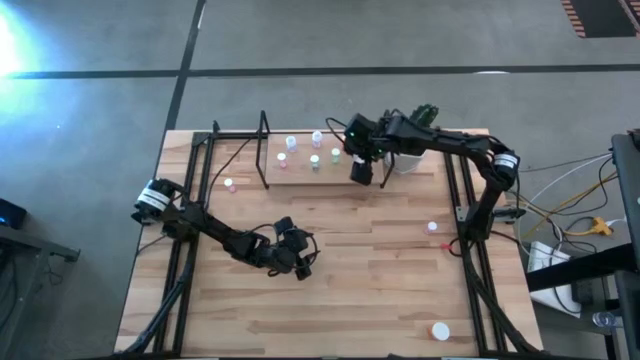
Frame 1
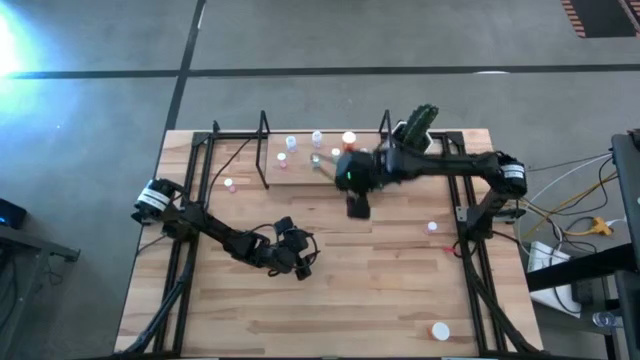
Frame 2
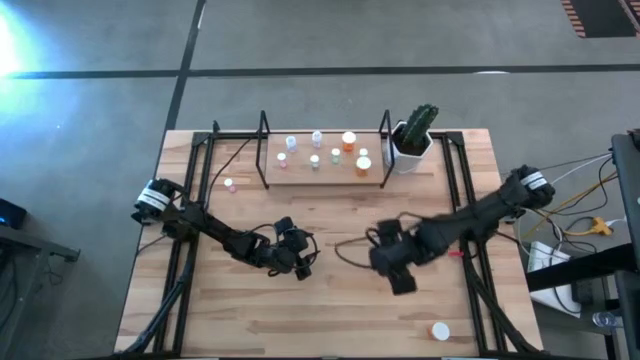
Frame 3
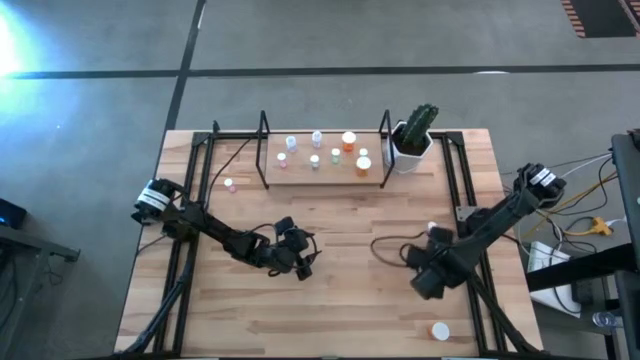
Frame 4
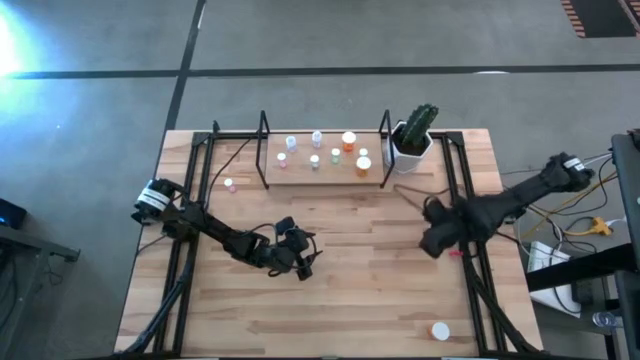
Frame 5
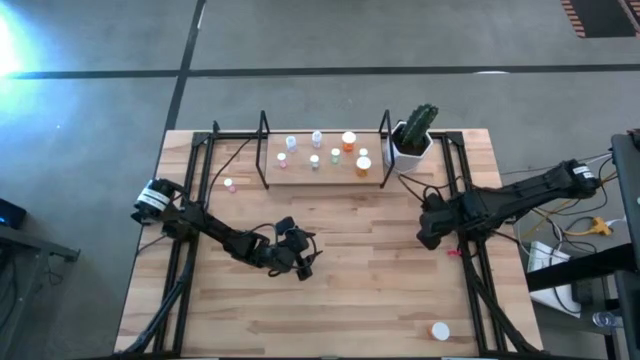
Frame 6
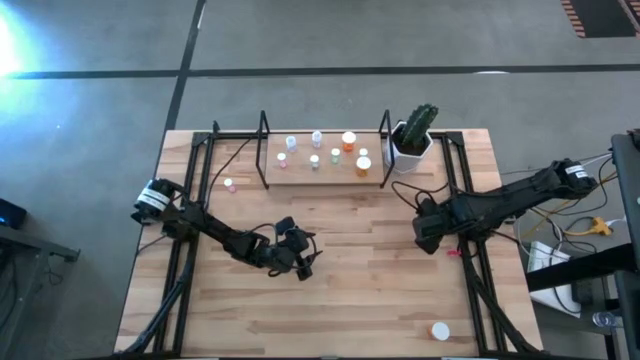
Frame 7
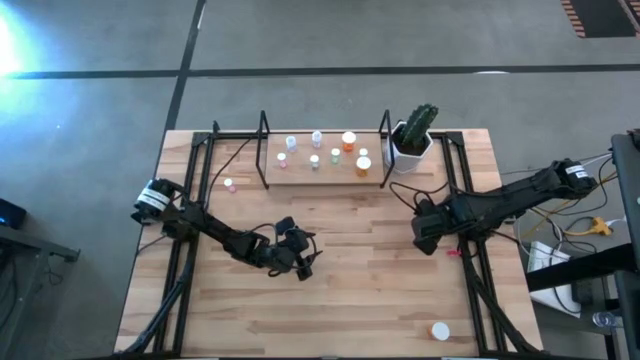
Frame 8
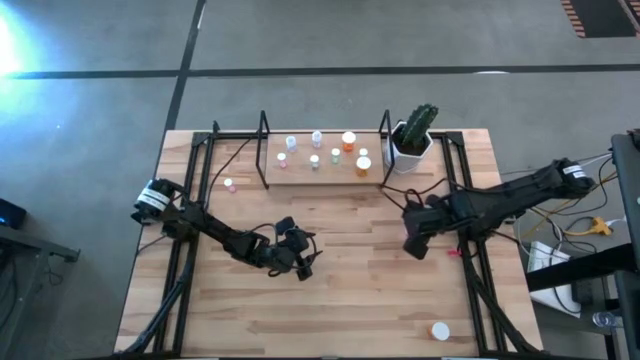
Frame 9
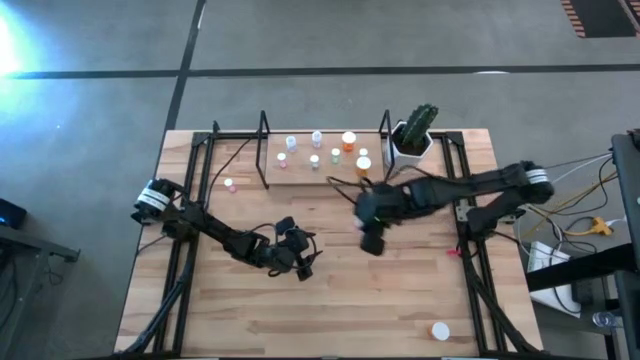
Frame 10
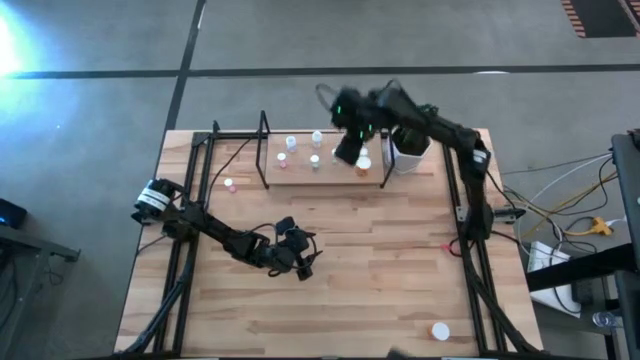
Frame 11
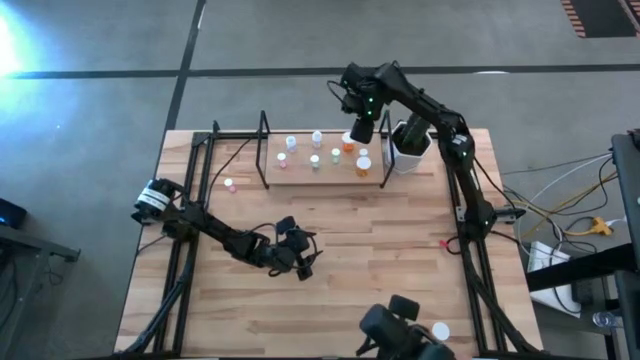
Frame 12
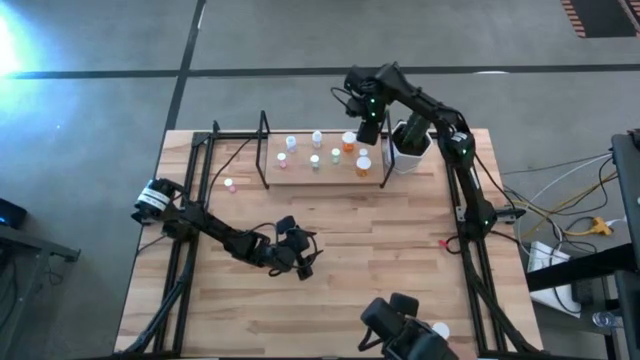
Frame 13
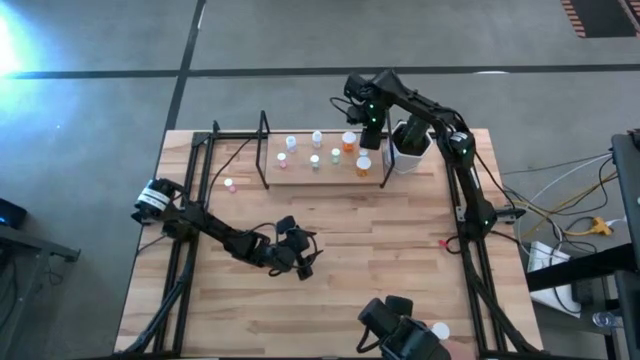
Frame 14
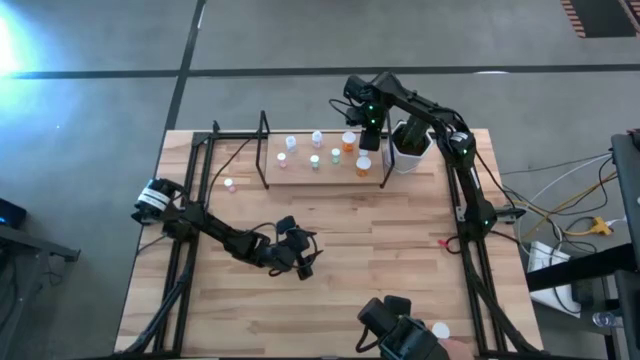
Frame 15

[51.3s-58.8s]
Task: Pick and place medicine bottles onto shelf by color
Put the bottom pink medicine bottle on the shelf

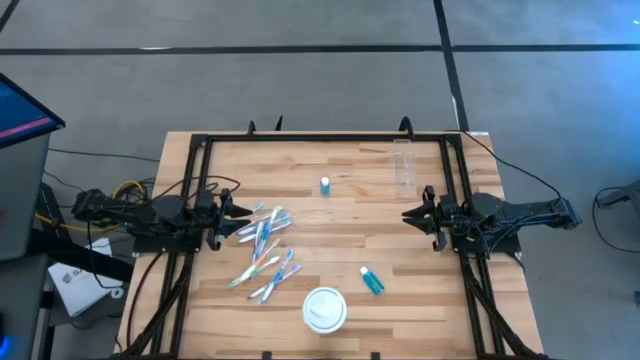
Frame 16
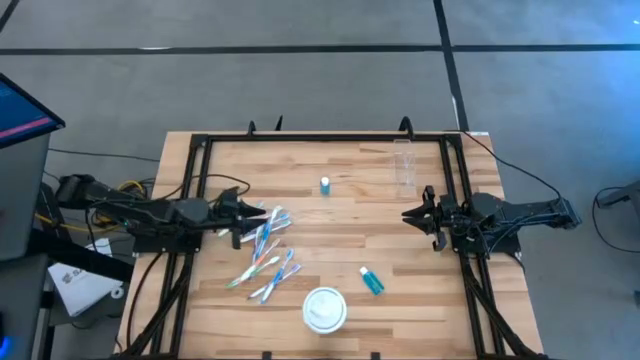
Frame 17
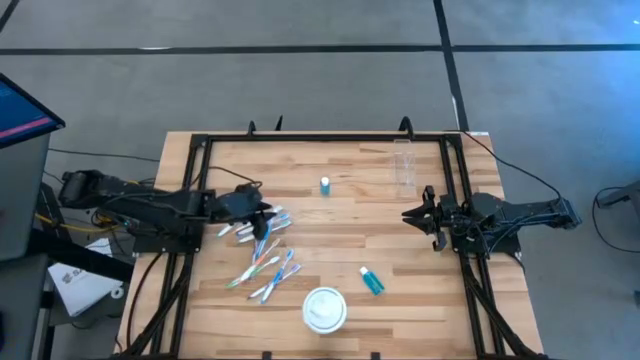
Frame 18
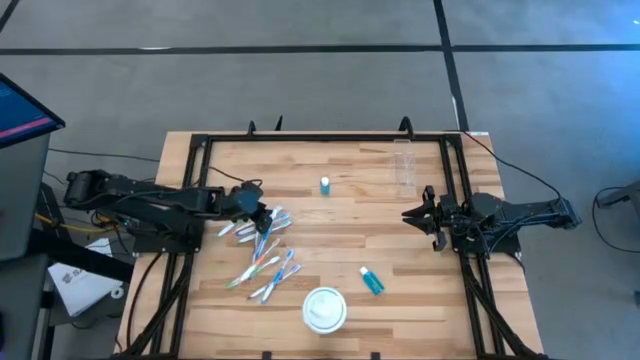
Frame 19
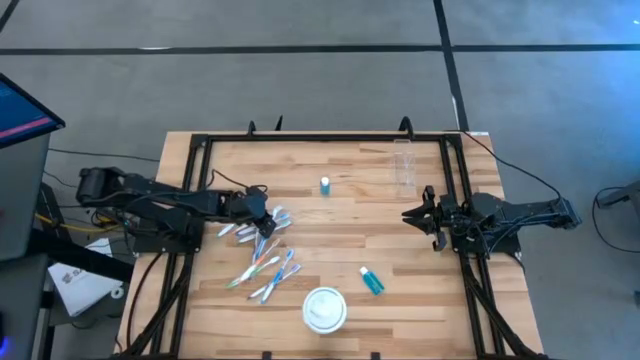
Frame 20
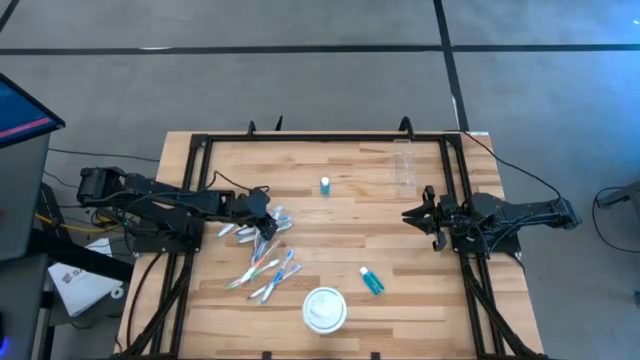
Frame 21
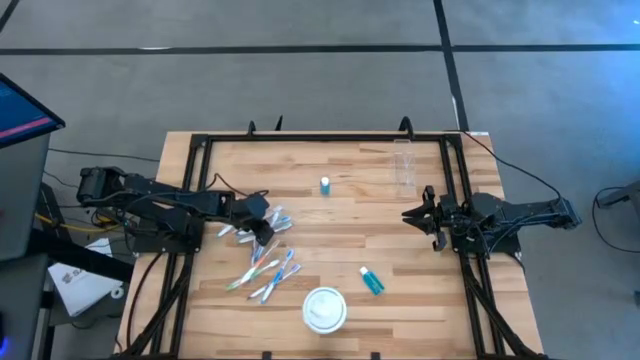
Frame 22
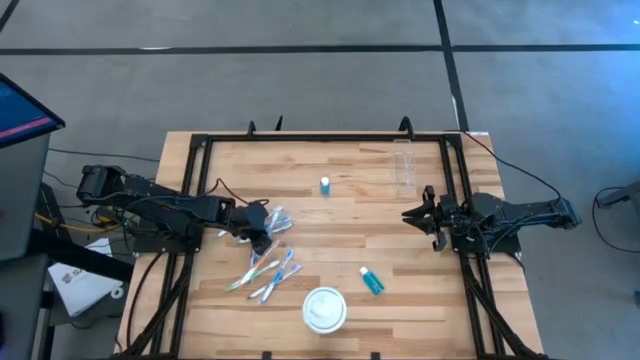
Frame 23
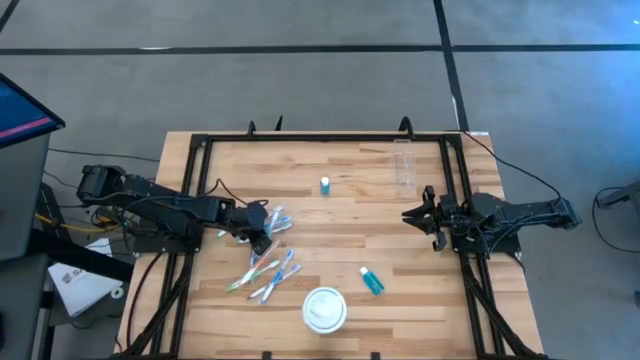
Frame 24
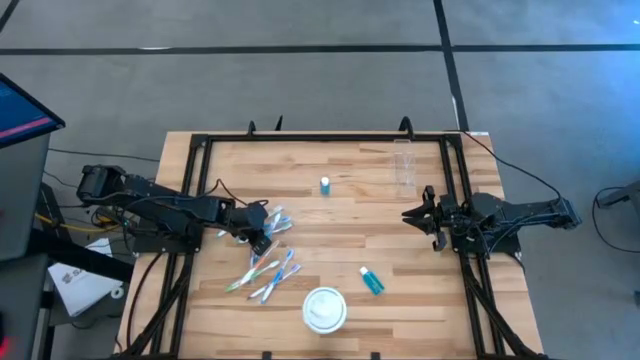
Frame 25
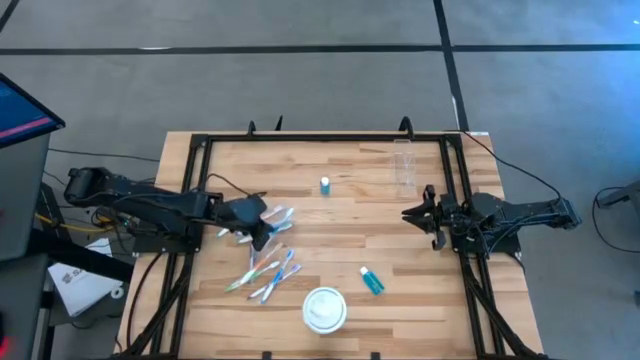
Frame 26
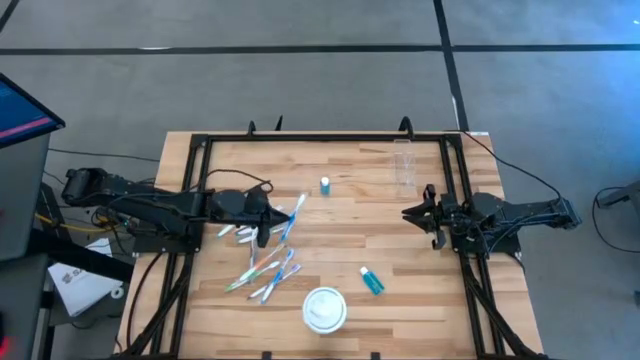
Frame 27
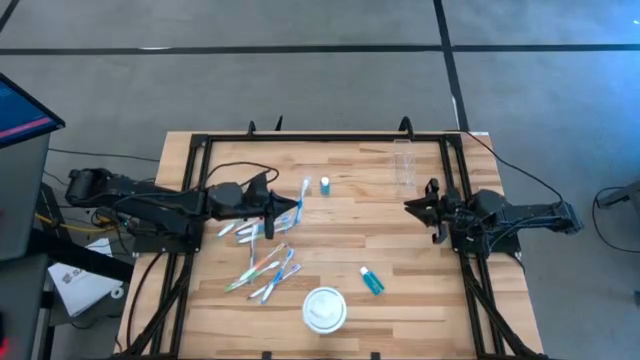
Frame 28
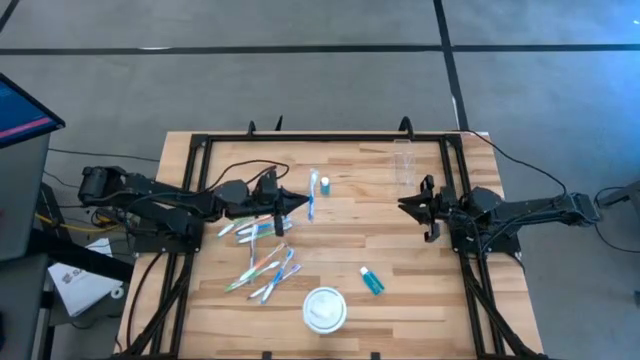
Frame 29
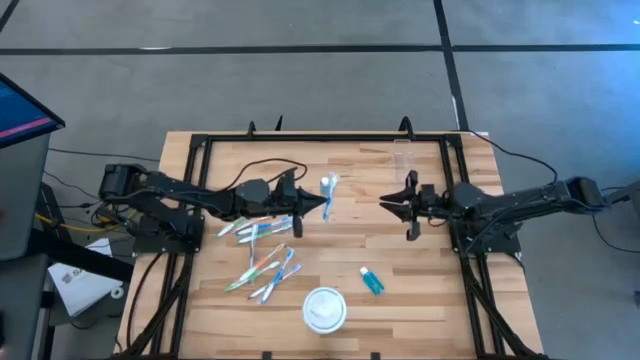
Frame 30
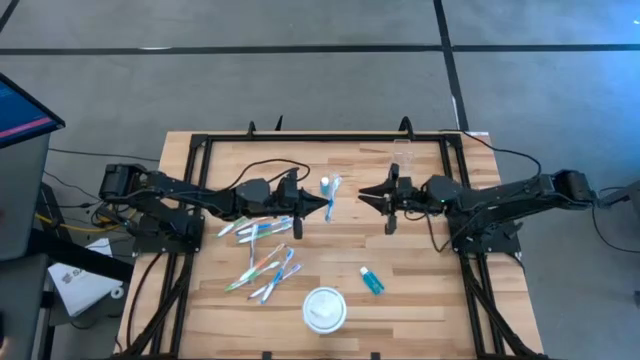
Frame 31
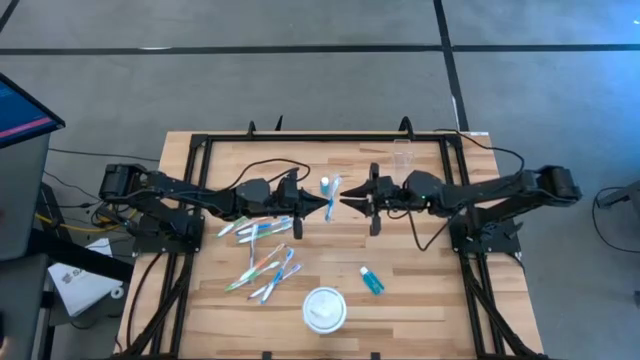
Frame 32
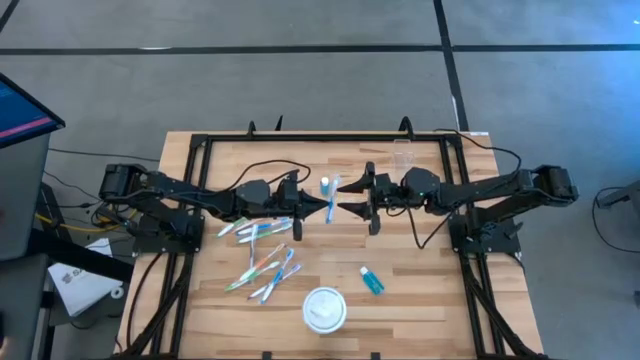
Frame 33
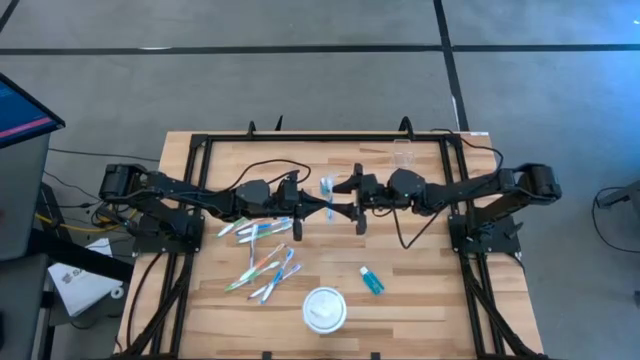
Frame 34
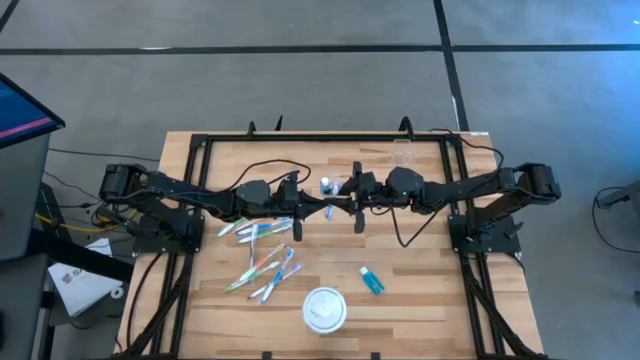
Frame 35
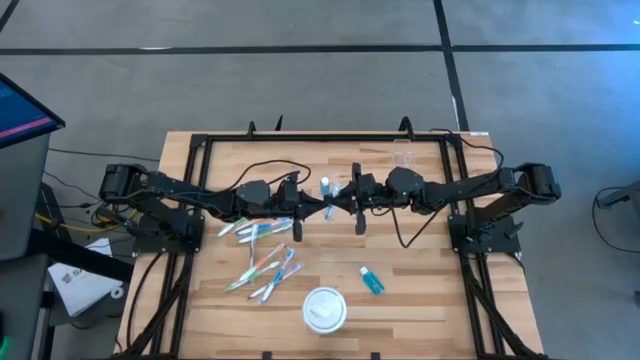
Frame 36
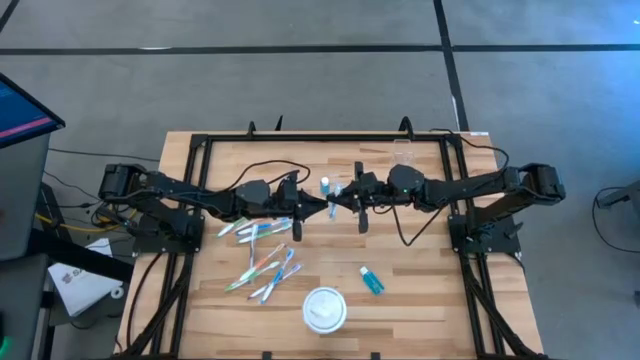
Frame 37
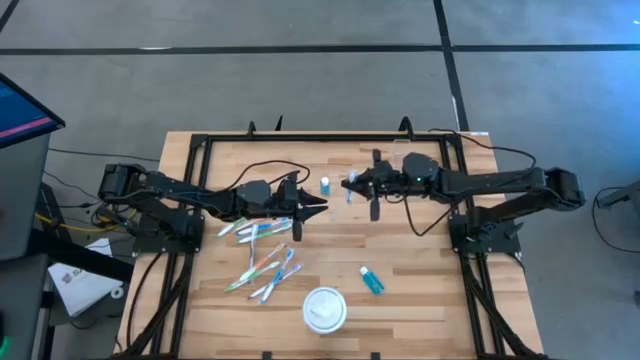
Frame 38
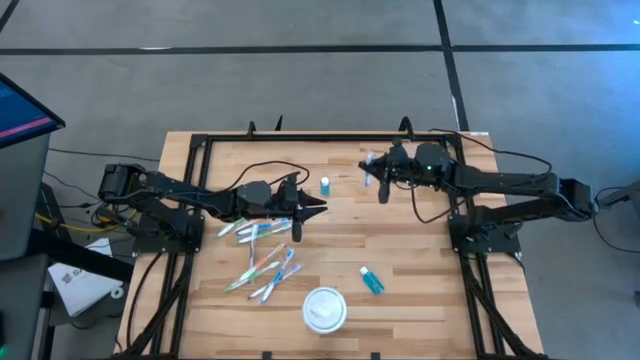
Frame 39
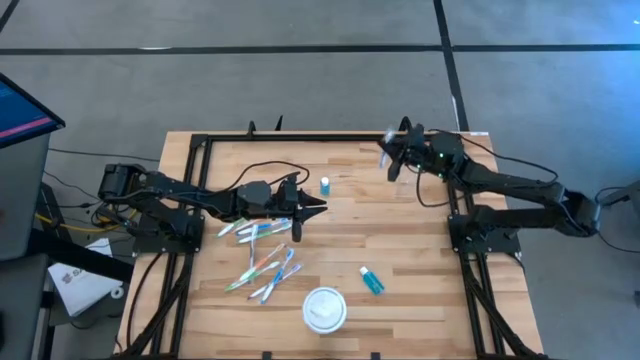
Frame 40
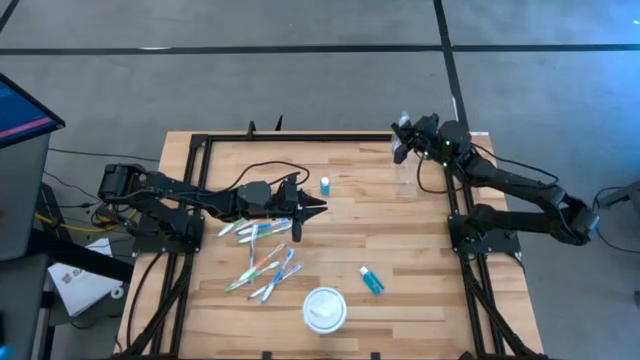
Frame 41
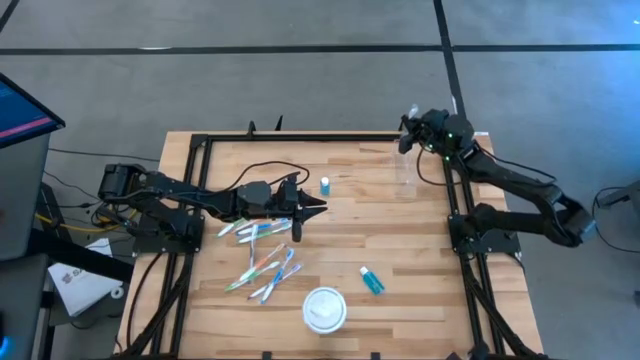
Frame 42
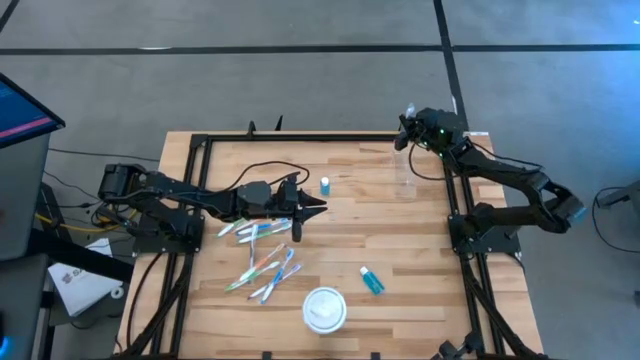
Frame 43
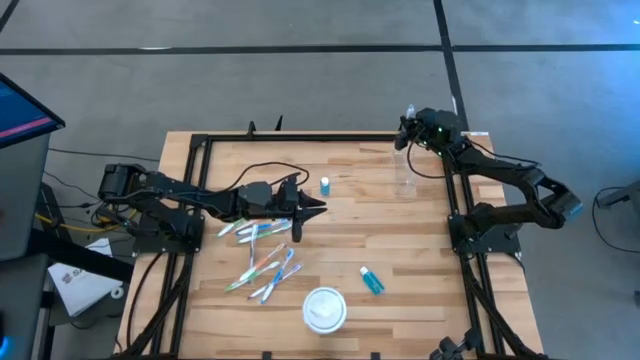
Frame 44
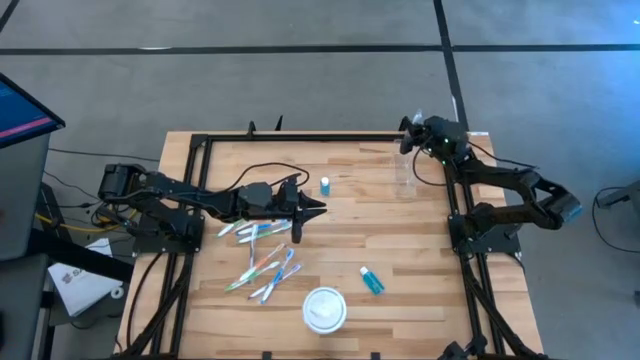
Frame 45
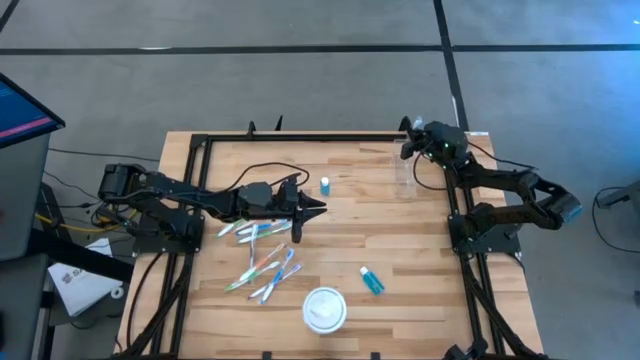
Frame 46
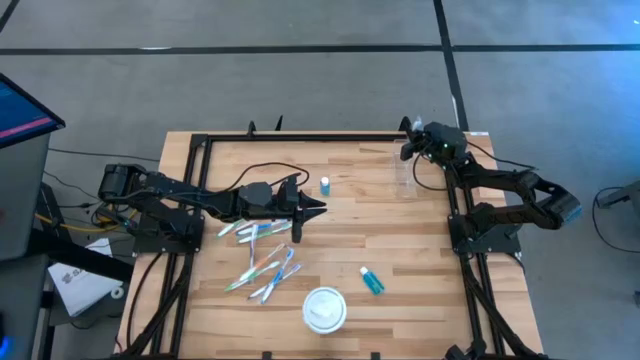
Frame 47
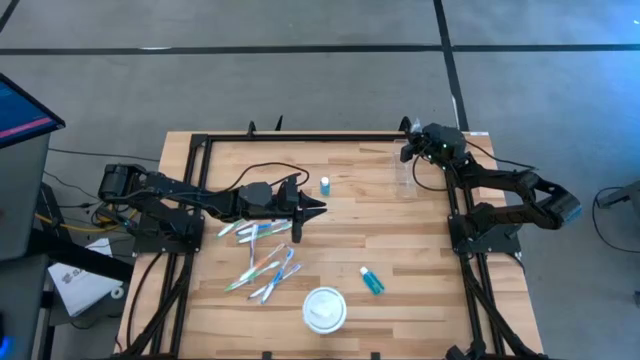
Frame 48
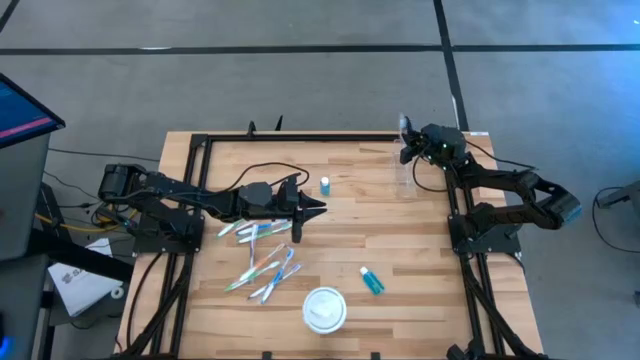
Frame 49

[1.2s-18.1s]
Task: Pick & Place toothbrushing station
Put the blue toothbrush into the transparent organizer
